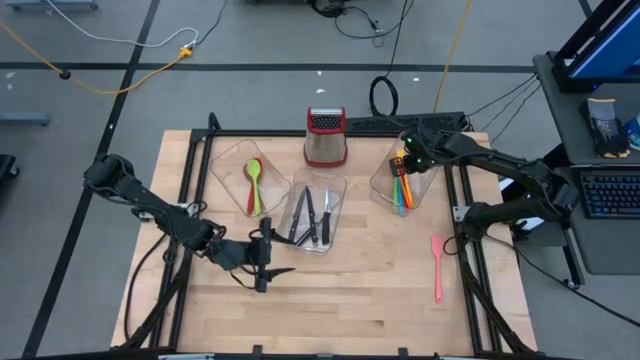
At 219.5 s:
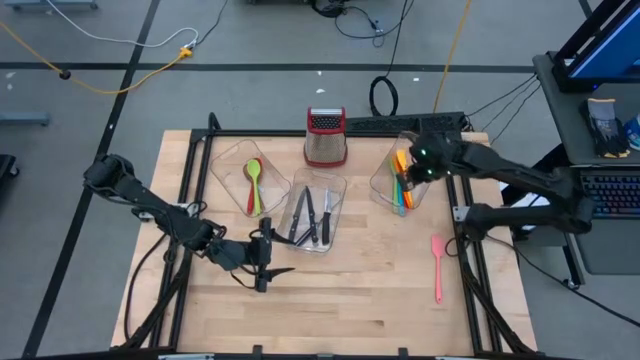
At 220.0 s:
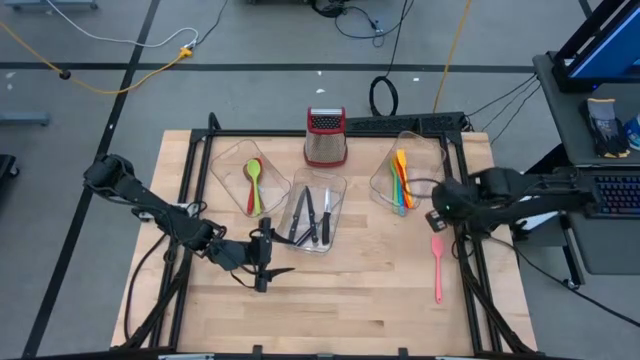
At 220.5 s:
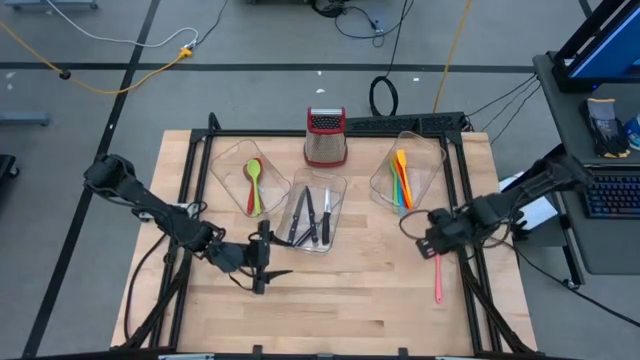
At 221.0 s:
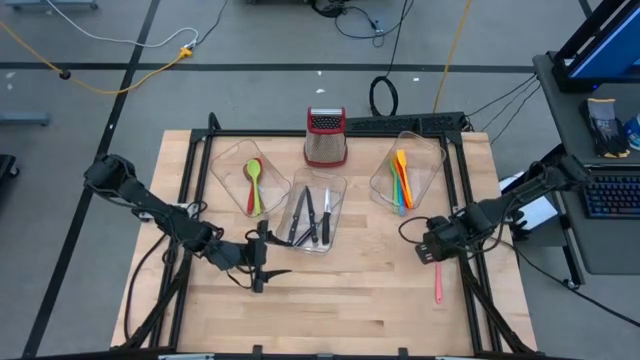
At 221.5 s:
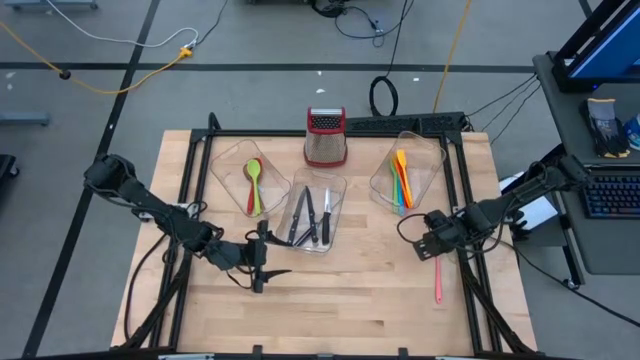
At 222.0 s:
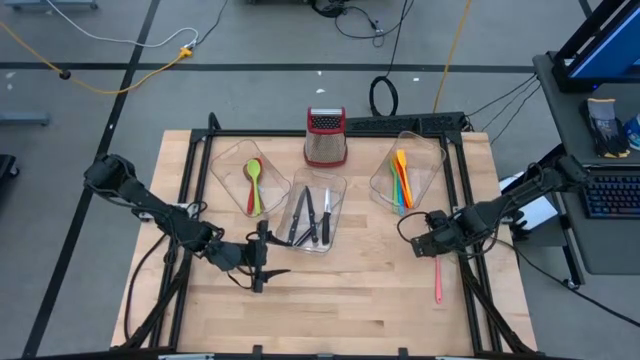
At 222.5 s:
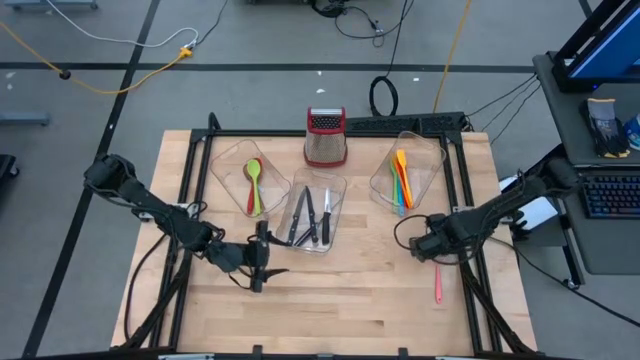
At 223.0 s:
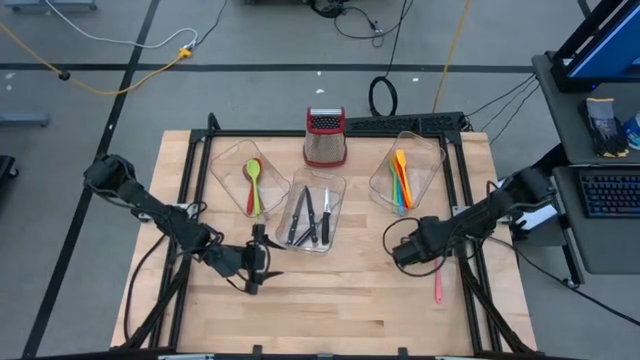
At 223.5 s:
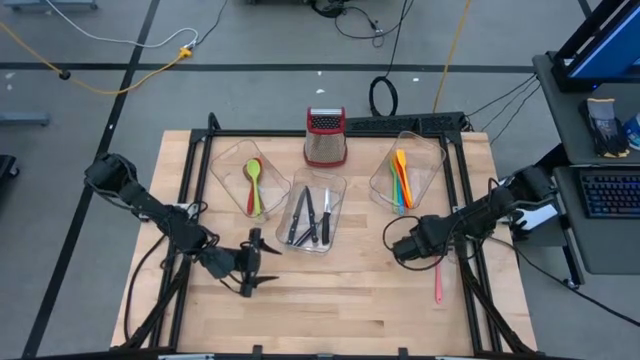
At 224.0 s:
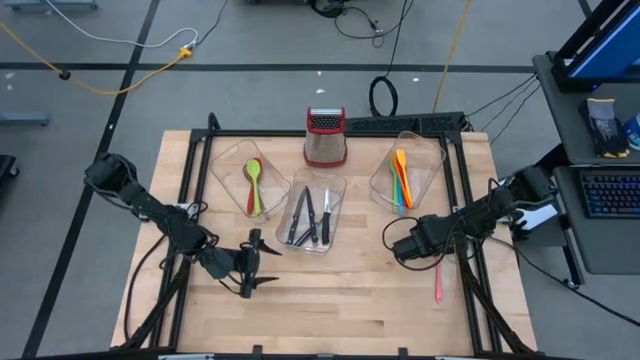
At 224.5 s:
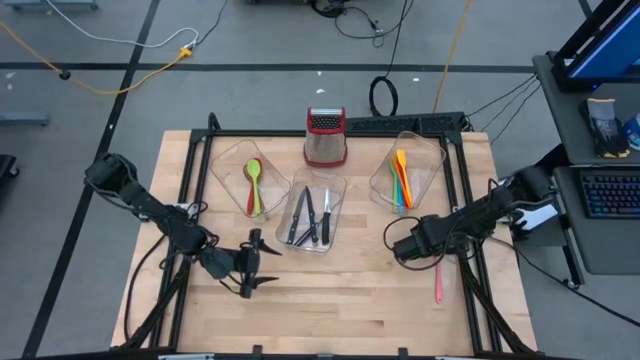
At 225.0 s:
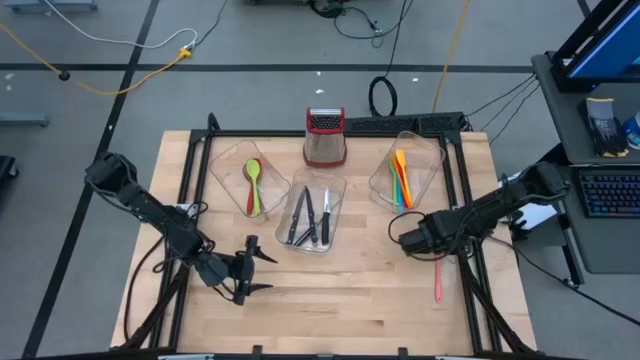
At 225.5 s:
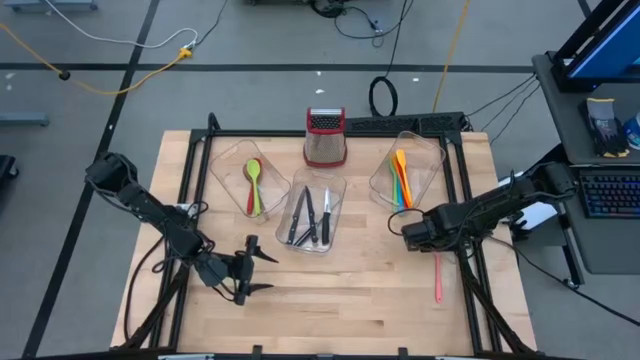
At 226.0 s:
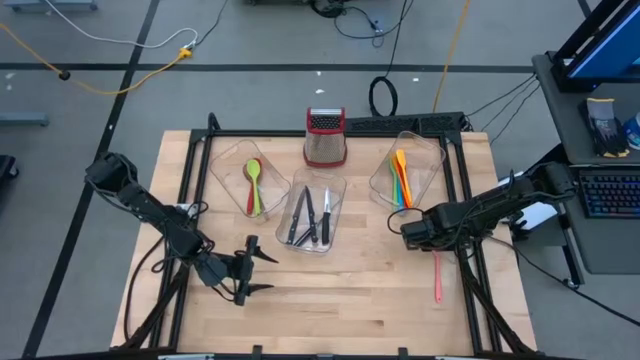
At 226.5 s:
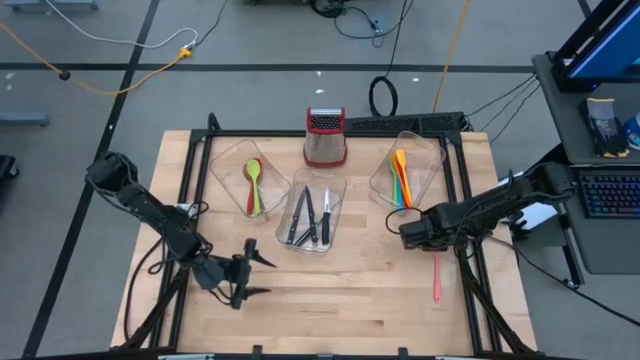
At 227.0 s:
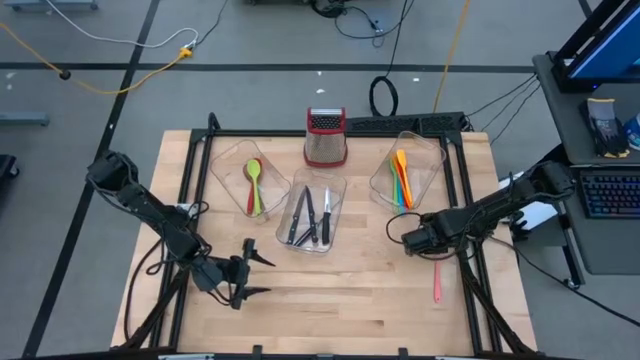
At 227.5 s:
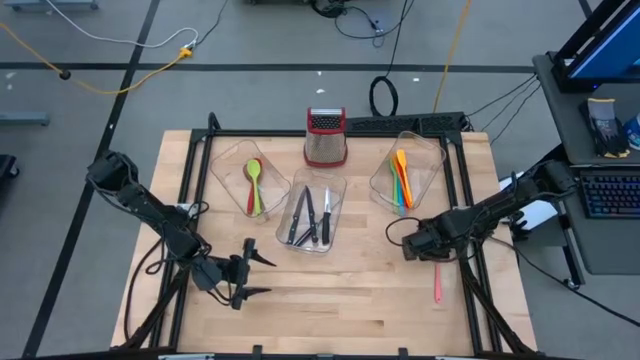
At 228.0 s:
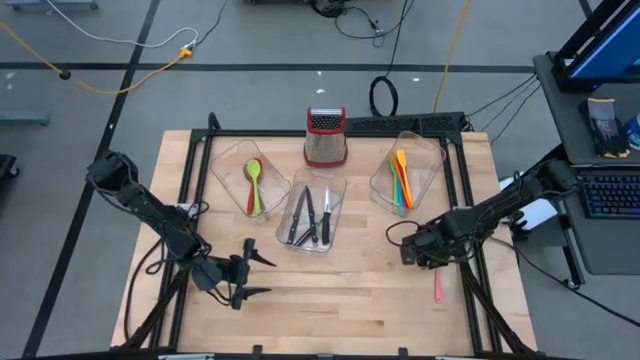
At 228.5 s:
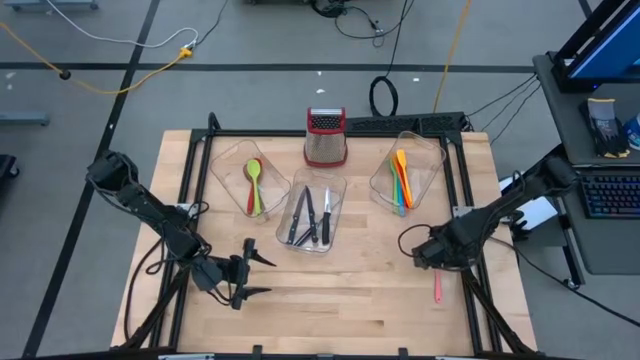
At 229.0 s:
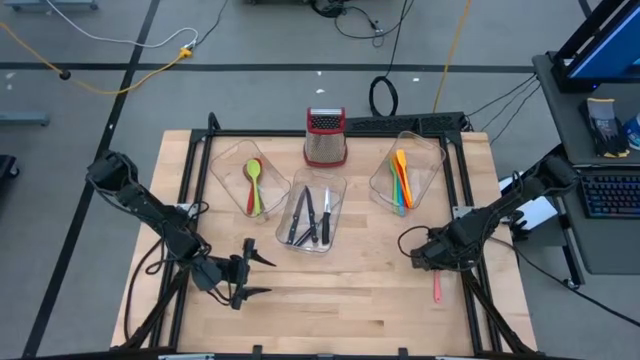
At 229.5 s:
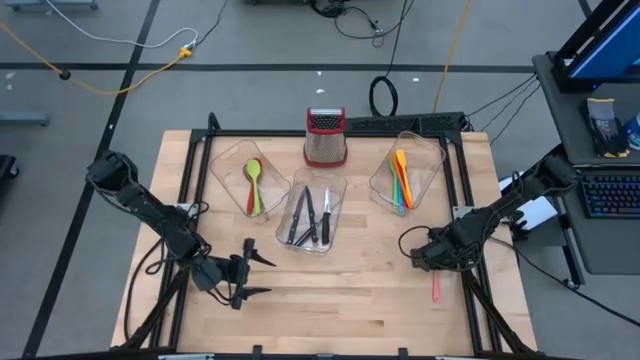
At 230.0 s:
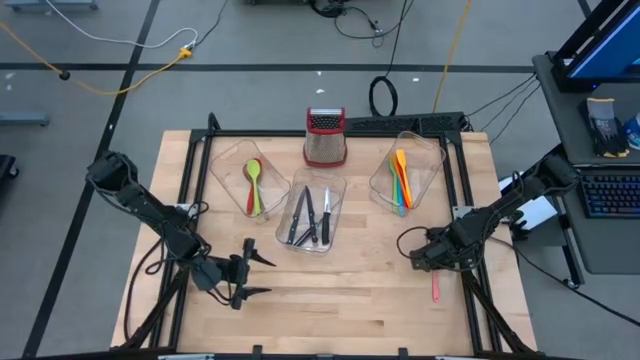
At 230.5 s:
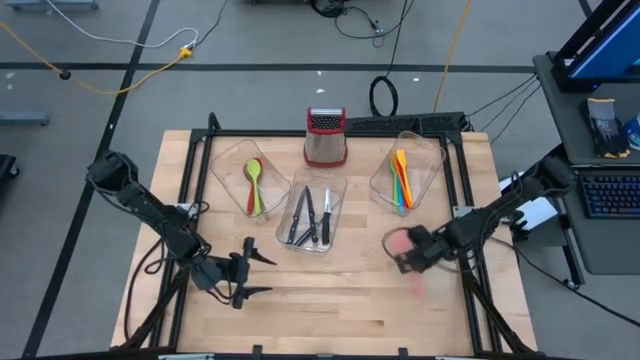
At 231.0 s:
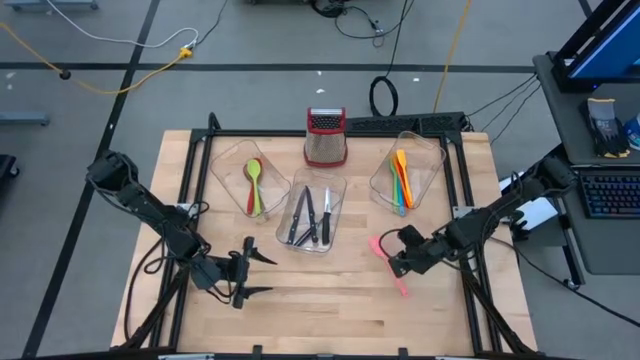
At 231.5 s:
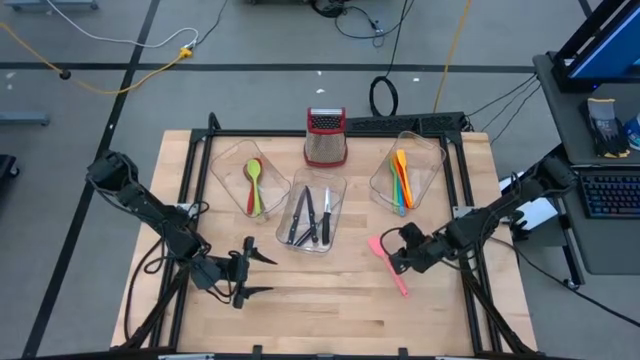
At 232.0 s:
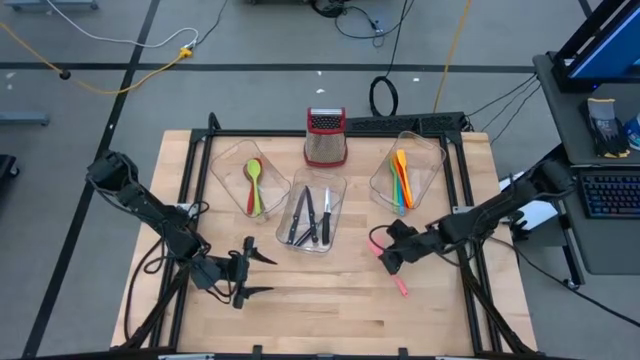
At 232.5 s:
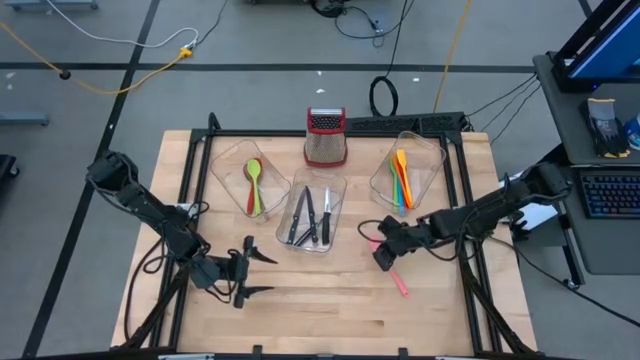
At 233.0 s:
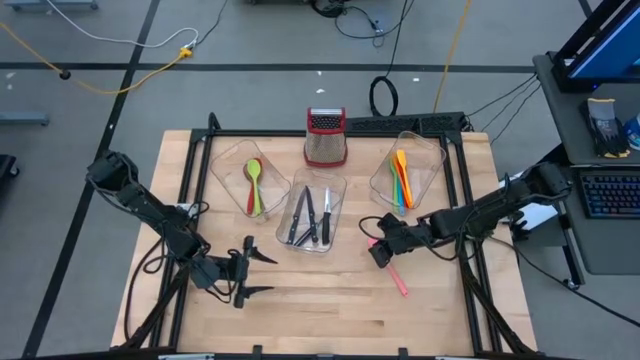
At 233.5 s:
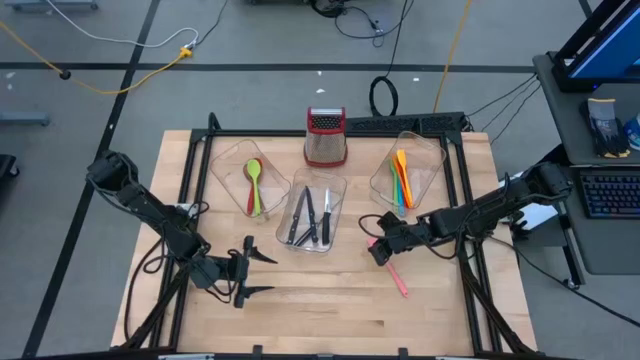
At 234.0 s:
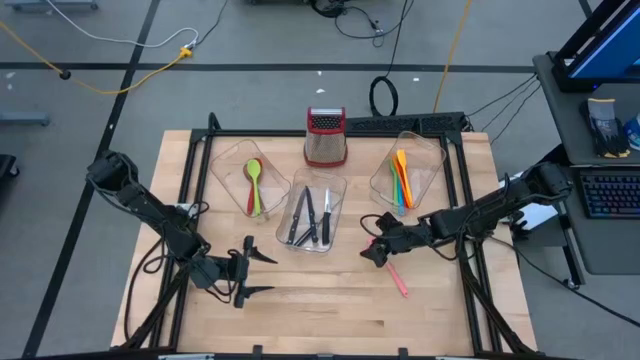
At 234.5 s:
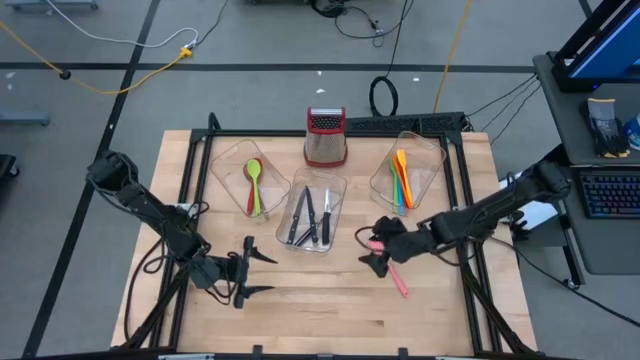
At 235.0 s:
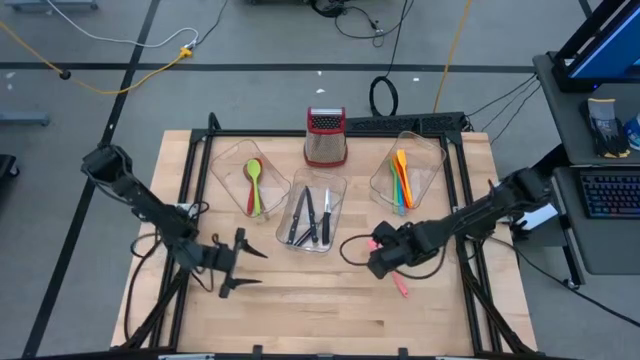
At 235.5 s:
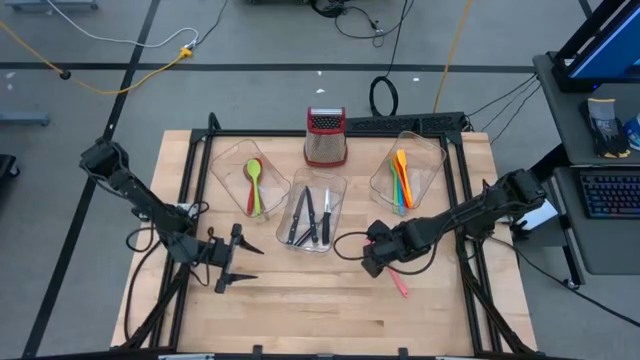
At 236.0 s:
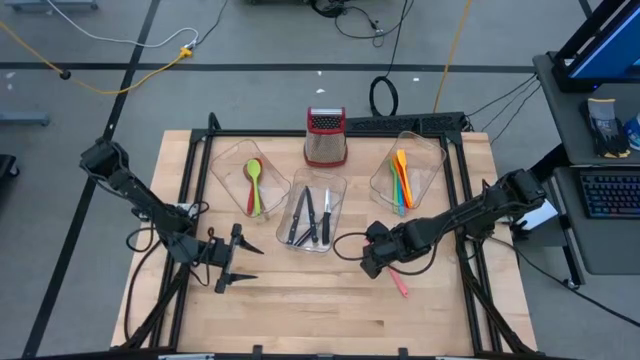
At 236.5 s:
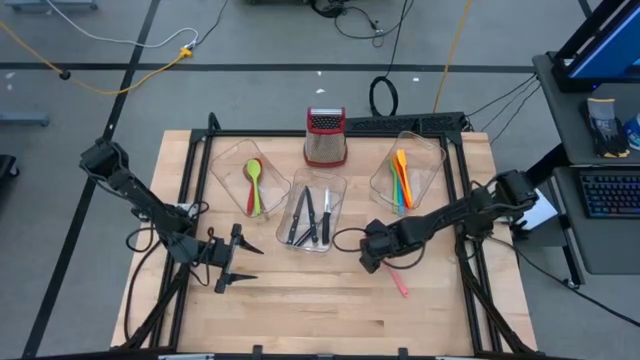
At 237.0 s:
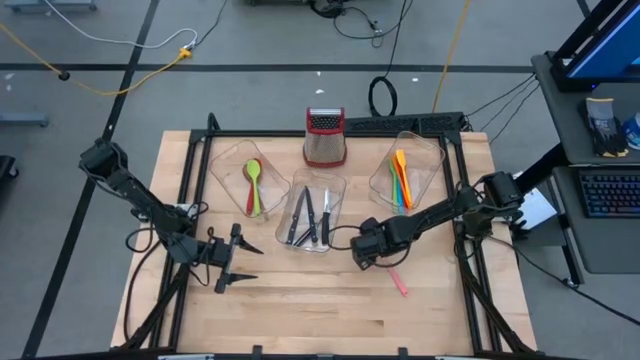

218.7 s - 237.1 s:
Task: Pick & Place Kitchen Items
Put the pink spatula on the right transparent bin

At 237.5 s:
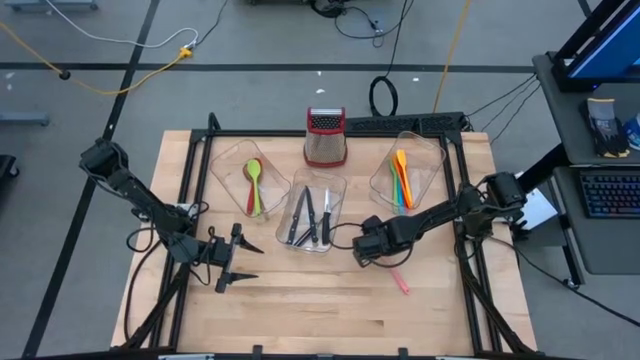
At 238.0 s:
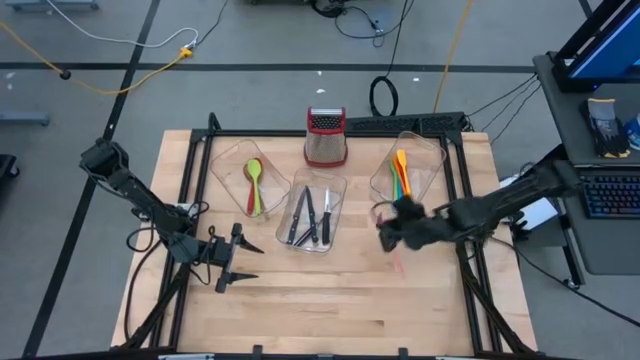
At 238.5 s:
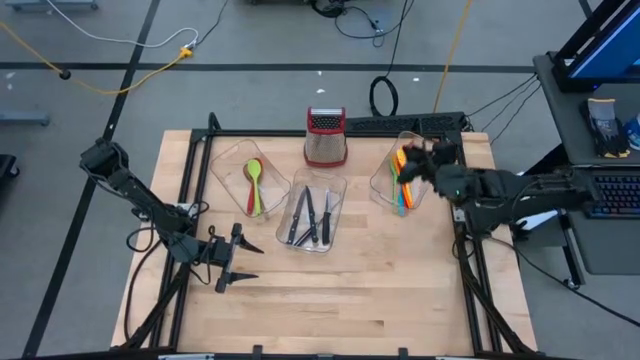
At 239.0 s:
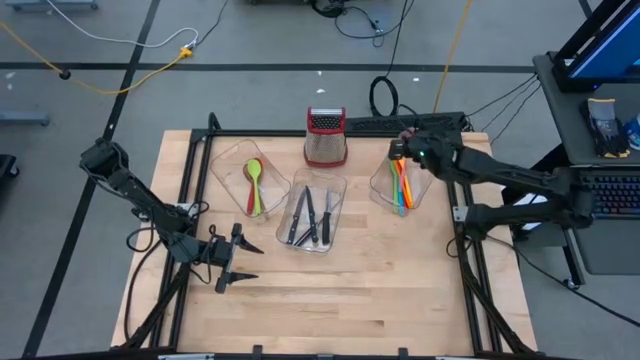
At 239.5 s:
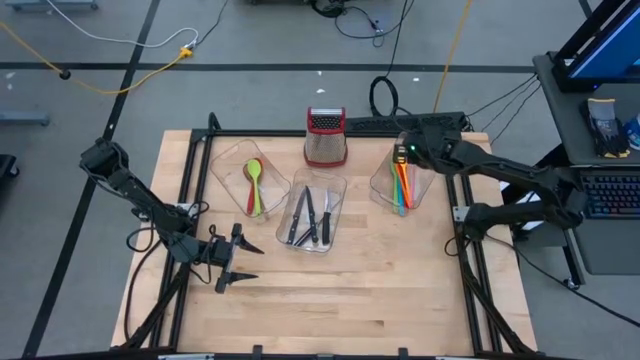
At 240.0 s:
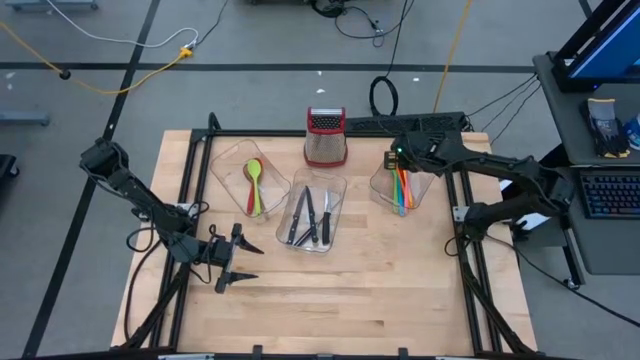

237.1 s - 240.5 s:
Put the pink spatula on the right transparent bin

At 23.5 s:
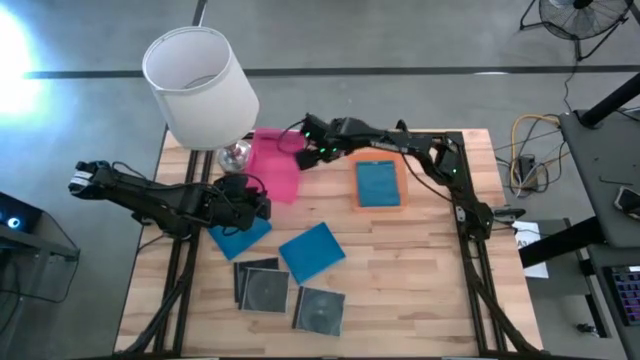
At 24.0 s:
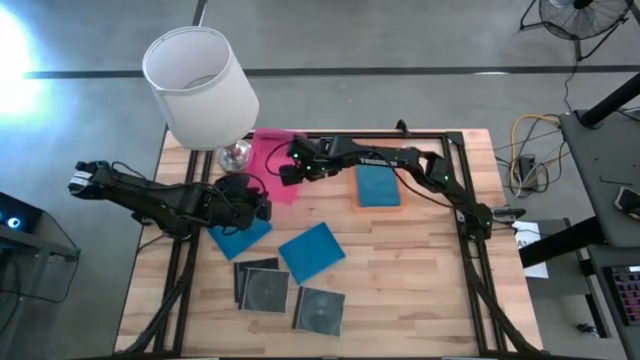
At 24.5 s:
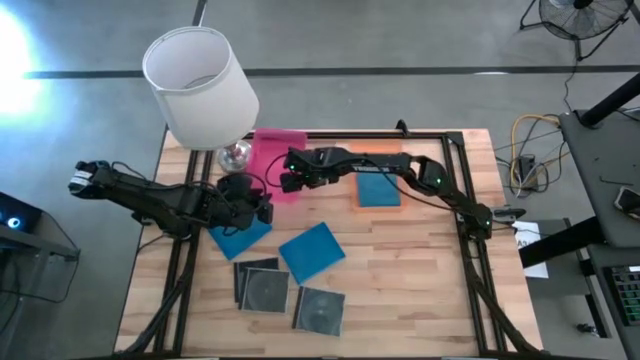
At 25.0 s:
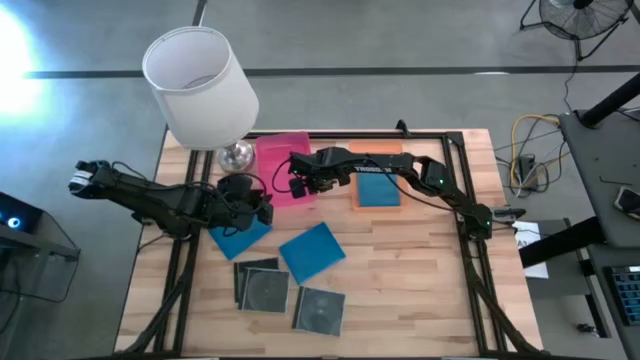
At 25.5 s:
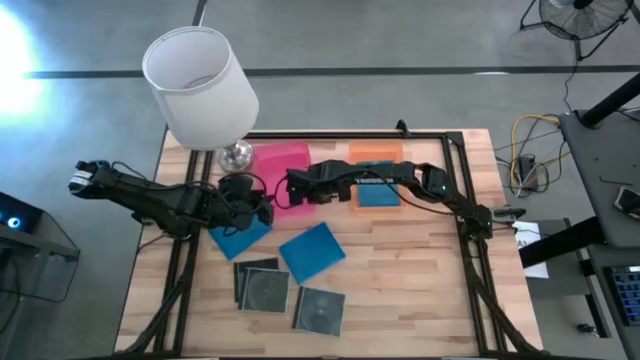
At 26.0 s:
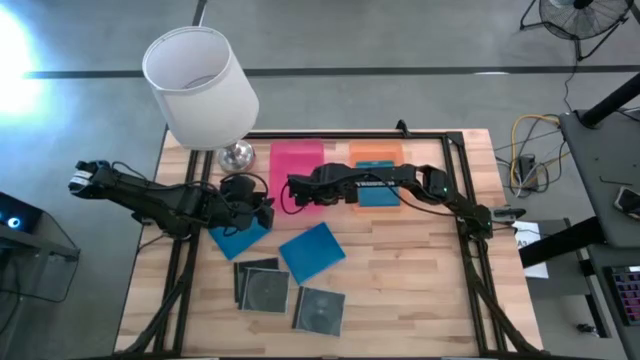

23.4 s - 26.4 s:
Task: Pick & place jewel cases by type
Adjust the red bin
